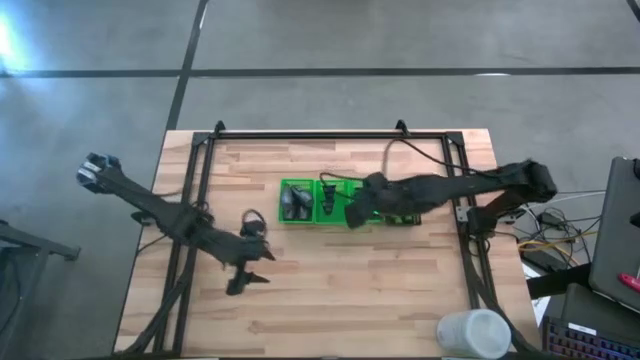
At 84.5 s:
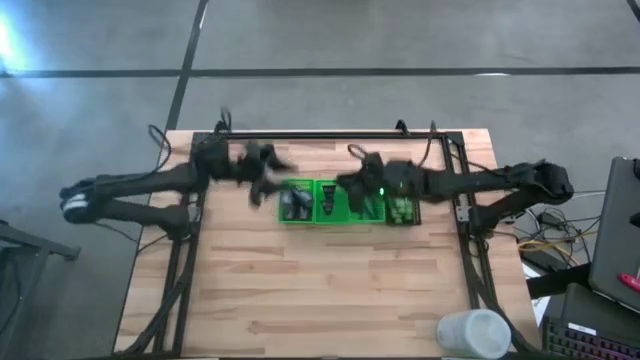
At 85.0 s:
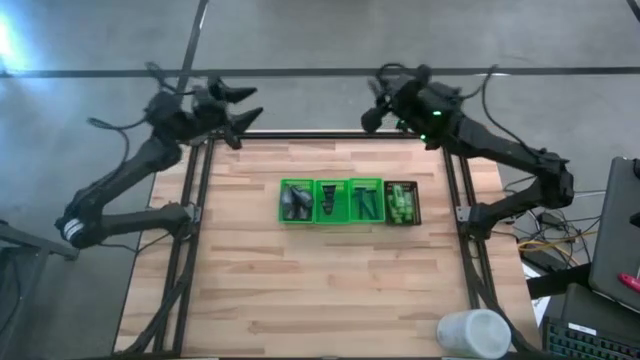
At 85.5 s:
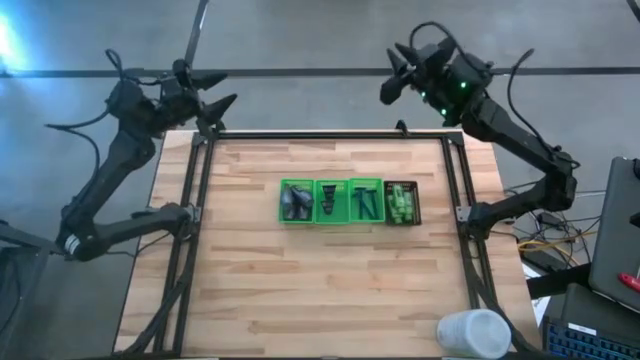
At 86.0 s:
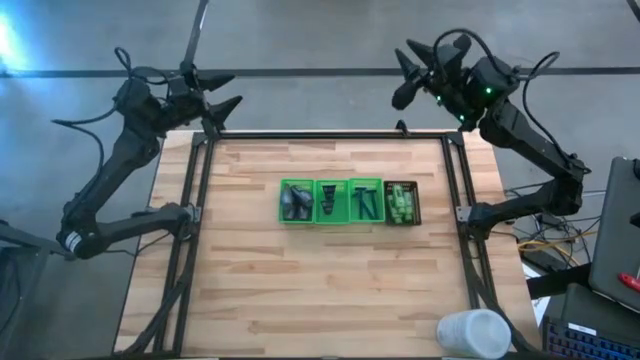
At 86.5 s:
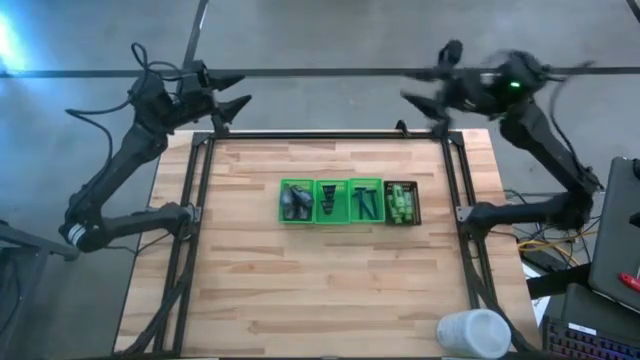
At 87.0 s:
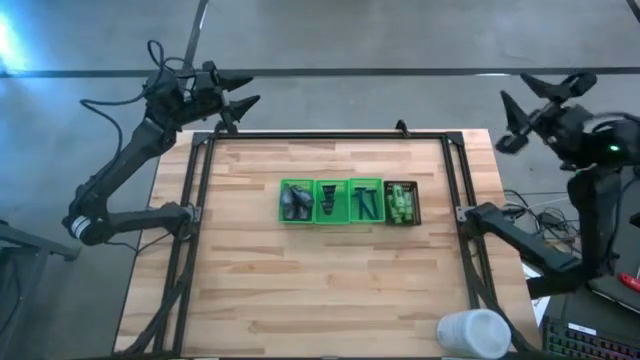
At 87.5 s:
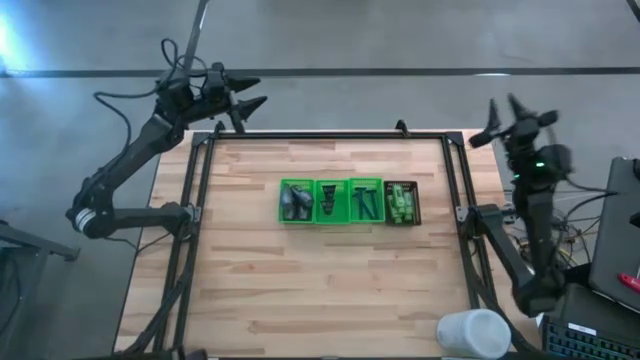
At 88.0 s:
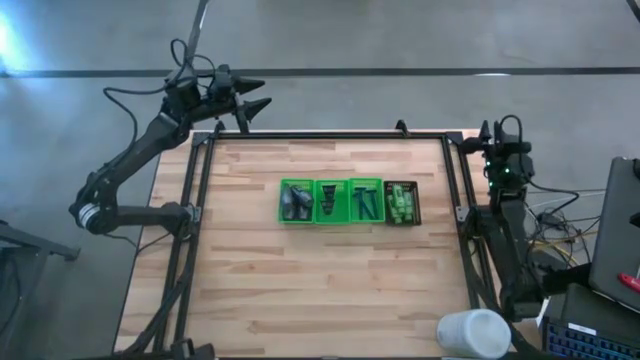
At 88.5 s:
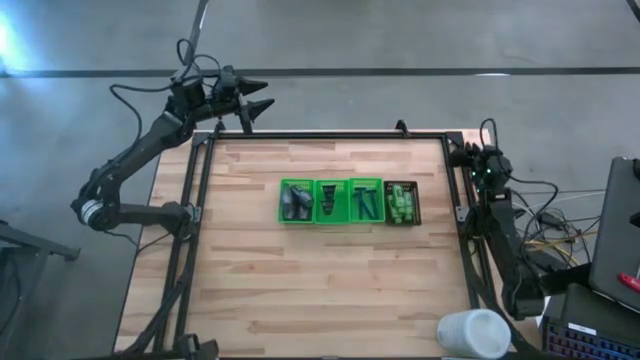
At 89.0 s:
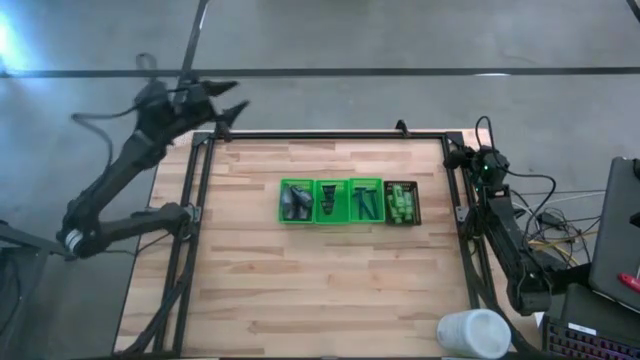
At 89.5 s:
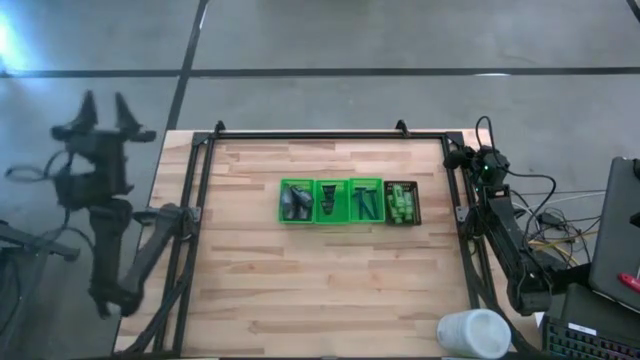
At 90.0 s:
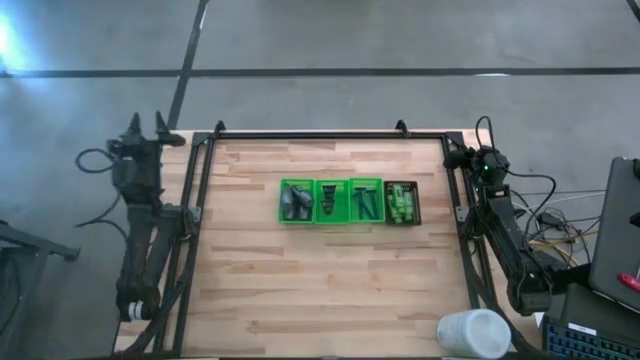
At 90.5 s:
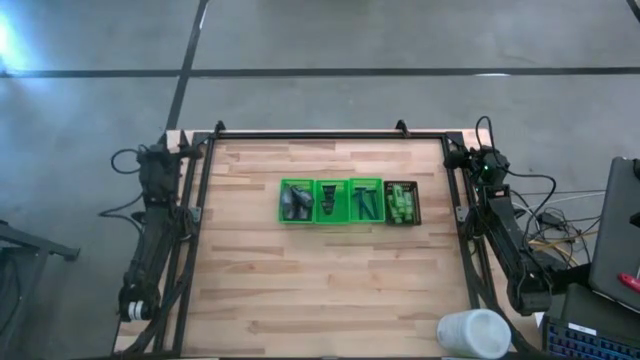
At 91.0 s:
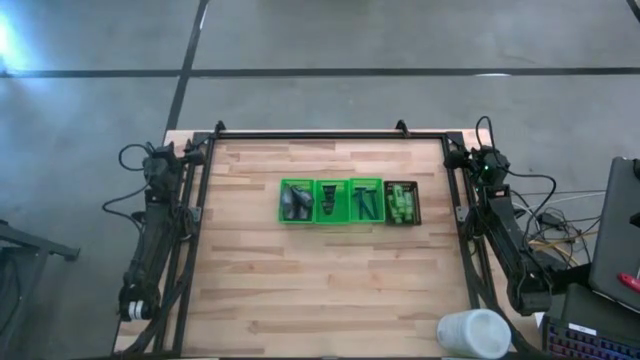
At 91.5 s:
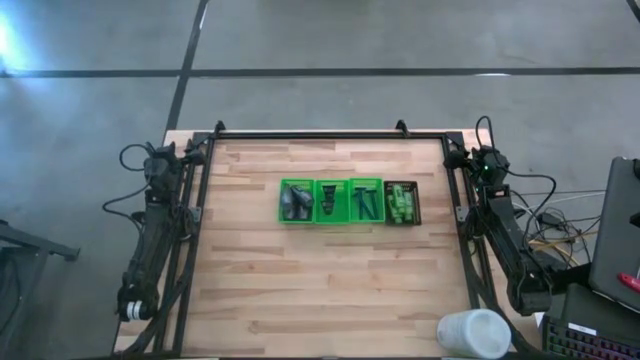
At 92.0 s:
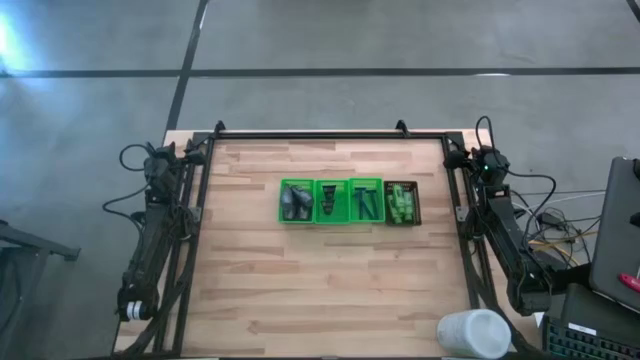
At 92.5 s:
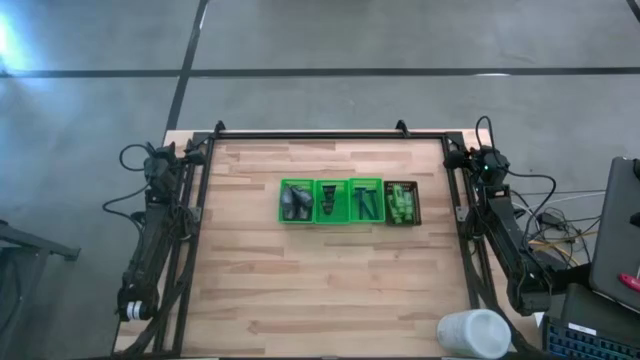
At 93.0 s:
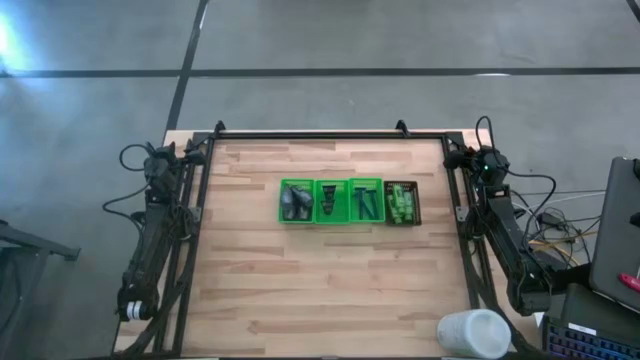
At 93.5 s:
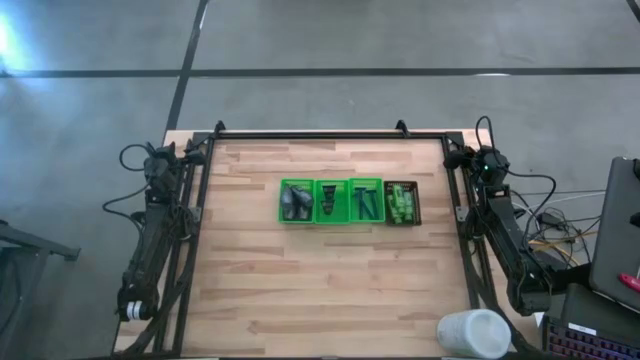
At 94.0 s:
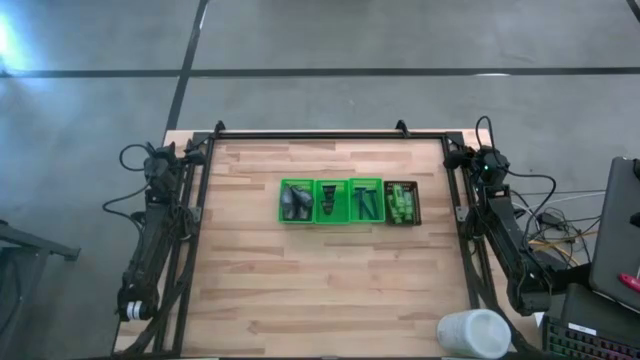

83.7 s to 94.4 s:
Task: Pick & Place Travel size toiletries
Return to Home Position

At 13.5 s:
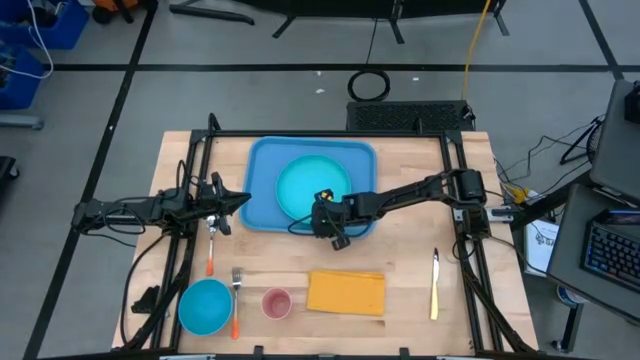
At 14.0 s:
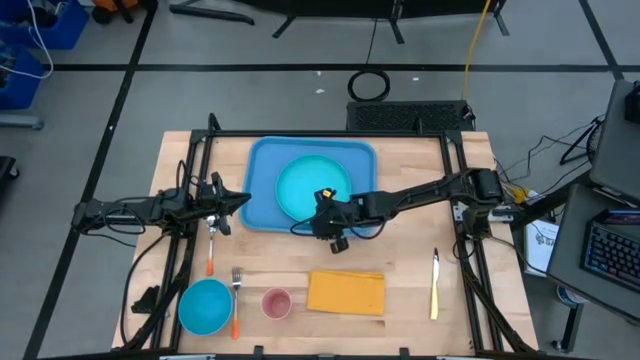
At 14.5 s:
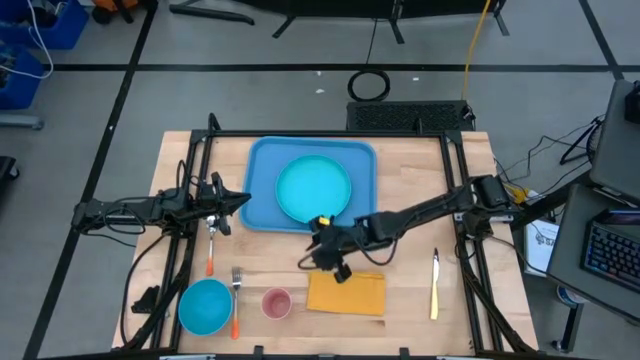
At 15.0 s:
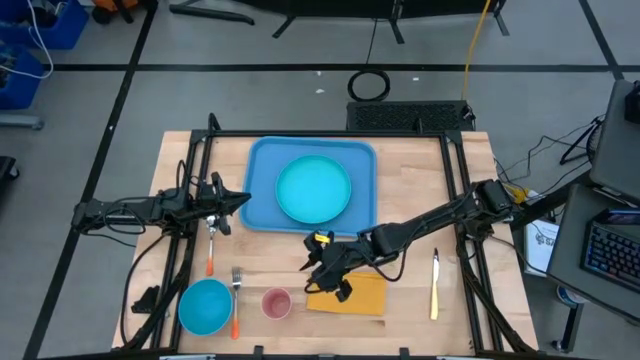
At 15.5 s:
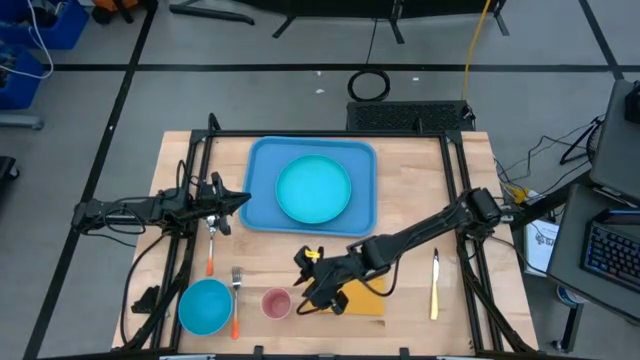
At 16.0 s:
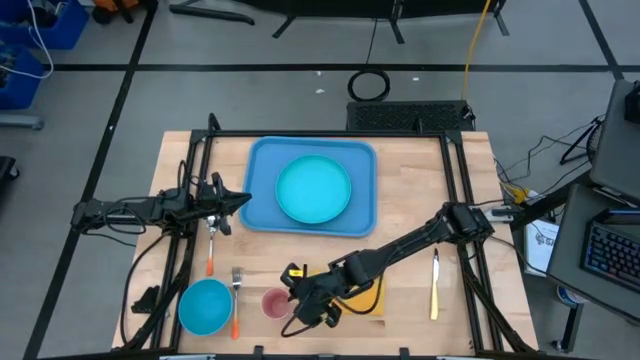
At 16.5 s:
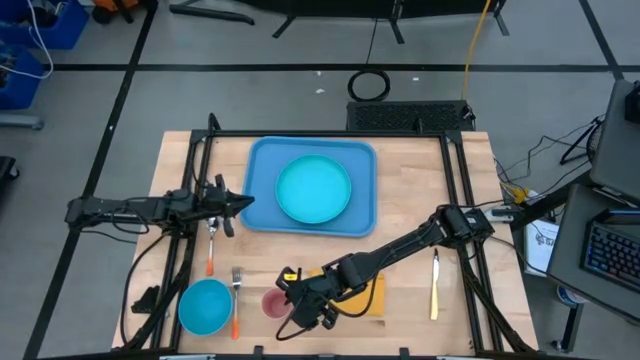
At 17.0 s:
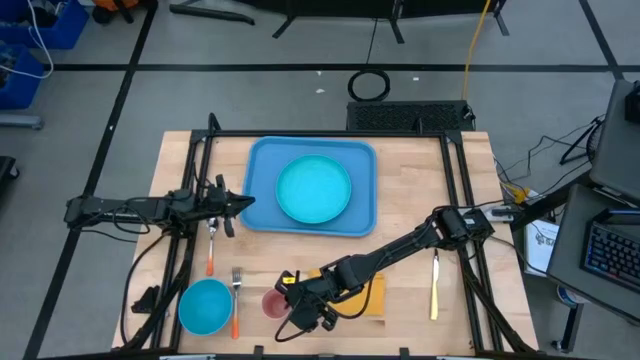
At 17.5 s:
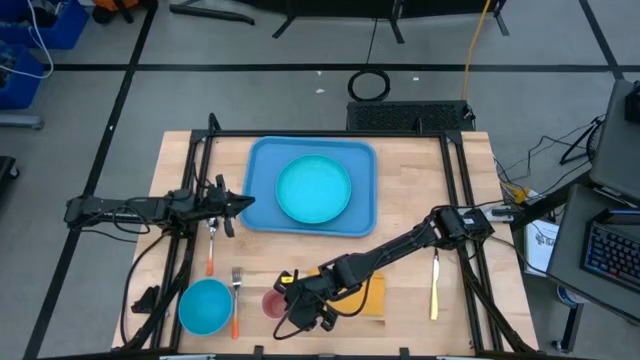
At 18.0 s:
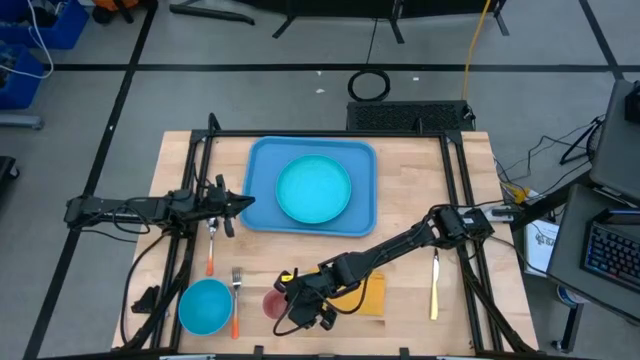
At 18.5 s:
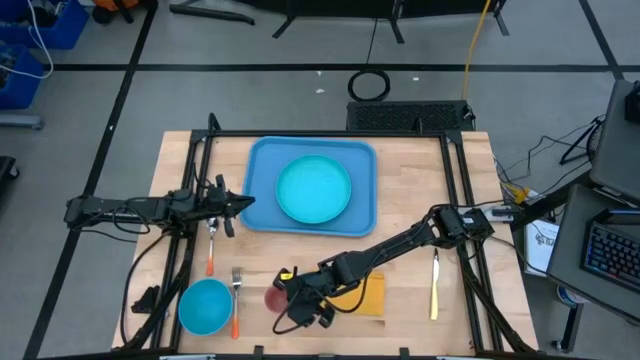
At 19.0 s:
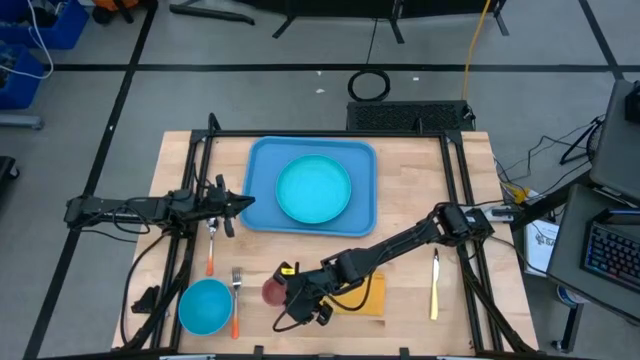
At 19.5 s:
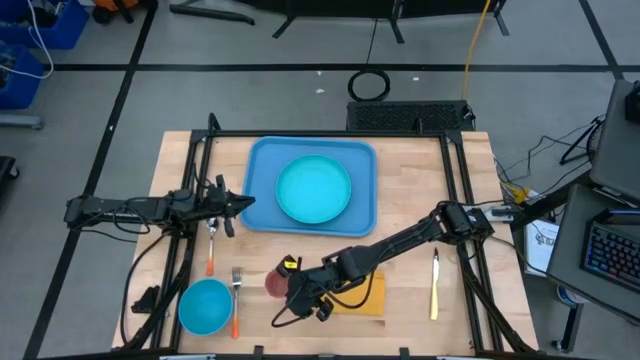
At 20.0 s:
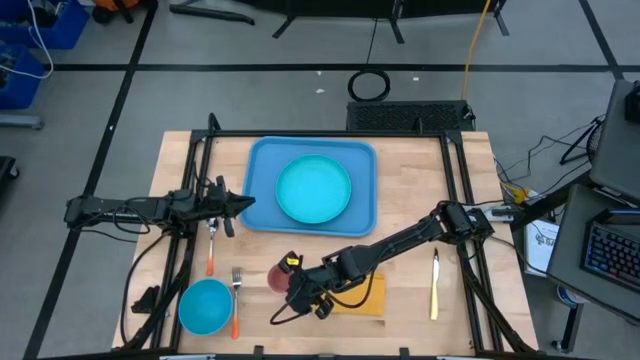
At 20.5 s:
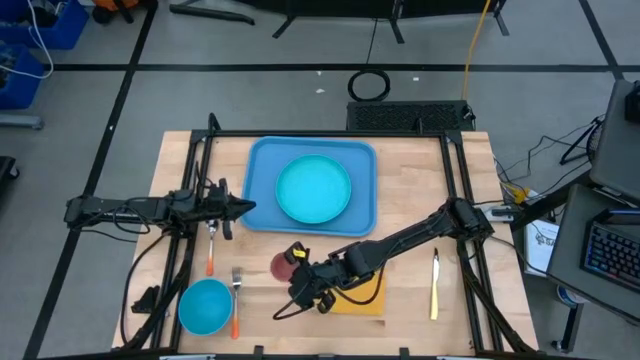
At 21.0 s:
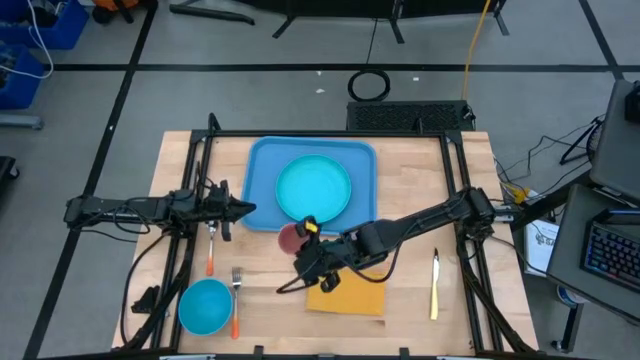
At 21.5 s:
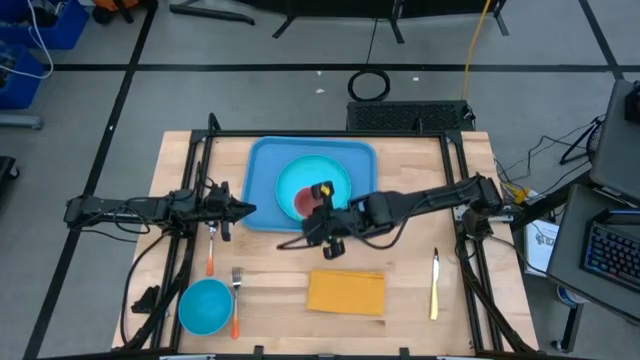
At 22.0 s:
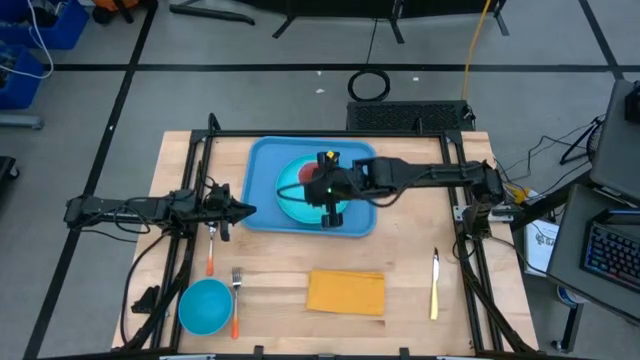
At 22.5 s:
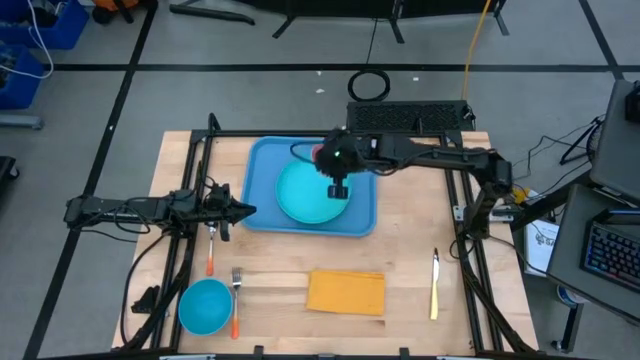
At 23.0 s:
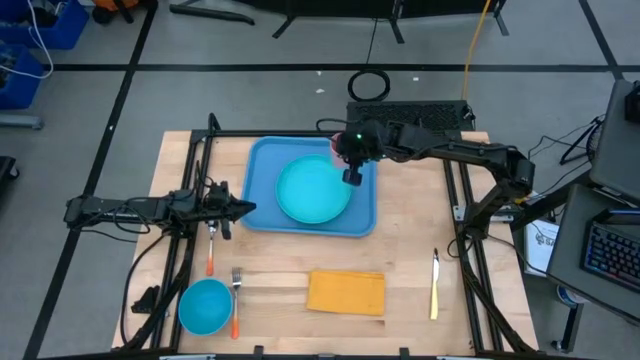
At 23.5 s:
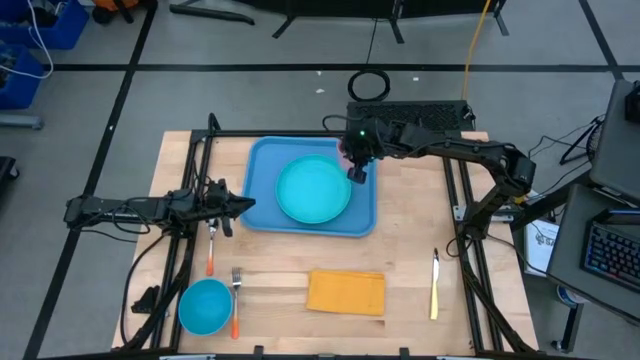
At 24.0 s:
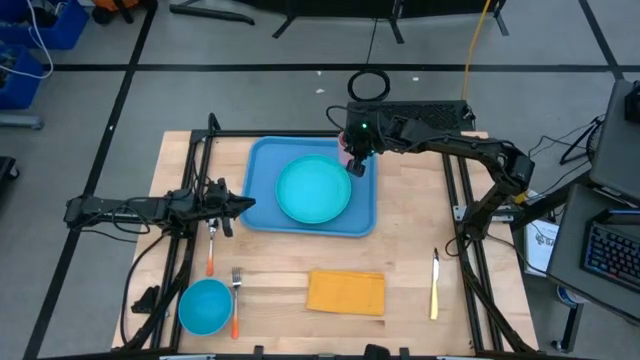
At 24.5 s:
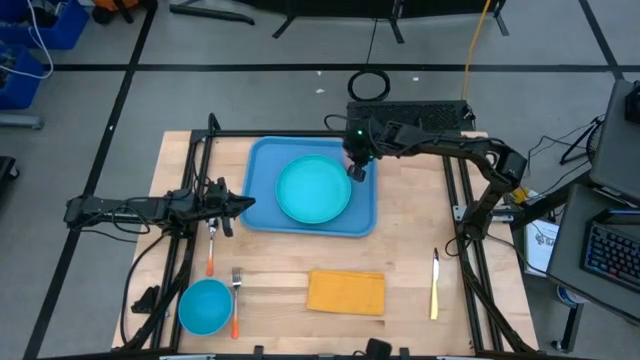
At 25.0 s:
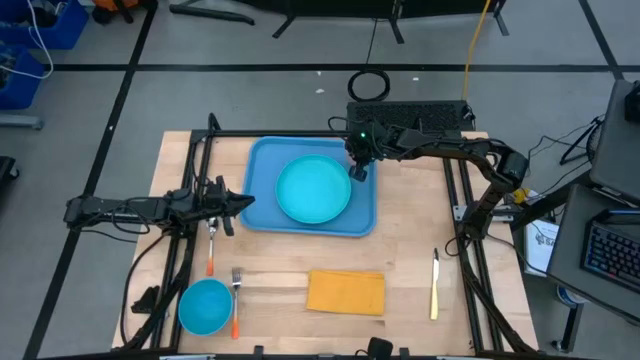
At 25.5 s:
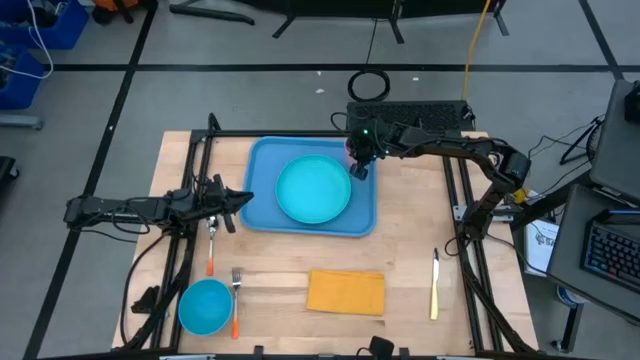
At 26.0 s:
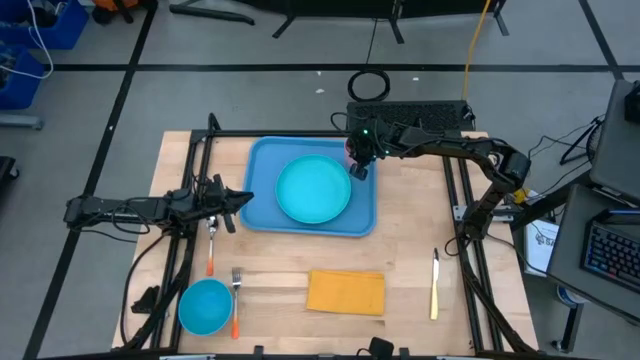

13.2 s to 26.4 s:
Task: Set up tray
Put the pink cup on the blue serving tray to the top right of the green plate
